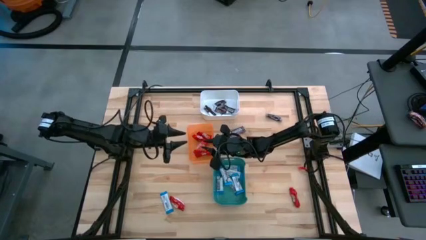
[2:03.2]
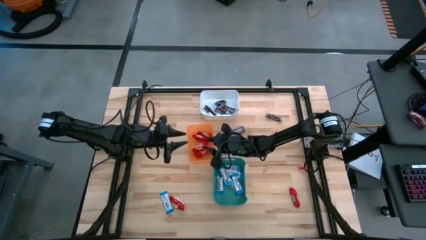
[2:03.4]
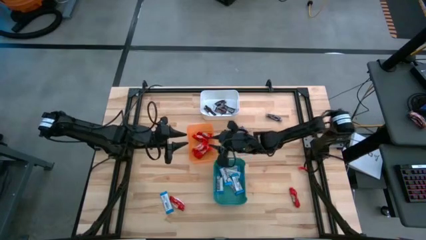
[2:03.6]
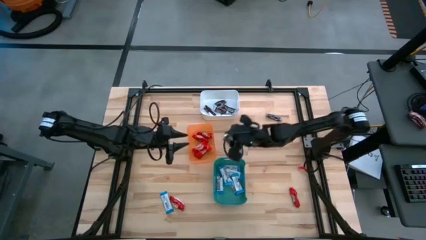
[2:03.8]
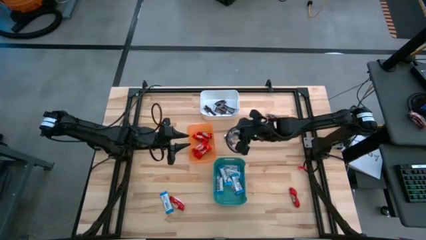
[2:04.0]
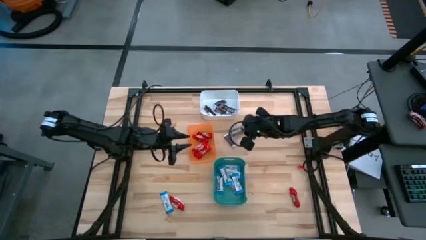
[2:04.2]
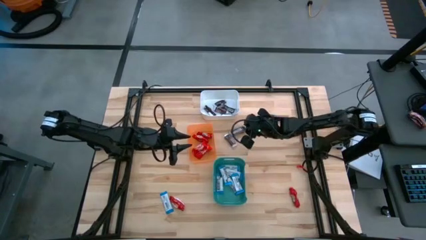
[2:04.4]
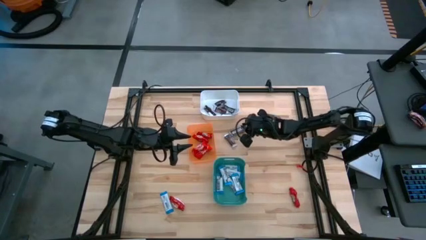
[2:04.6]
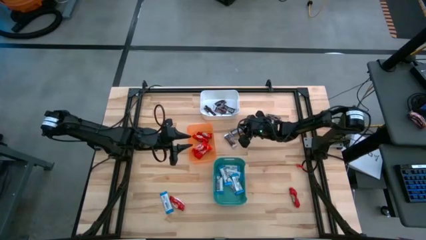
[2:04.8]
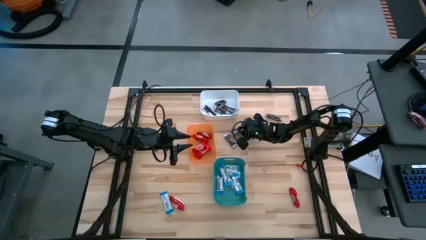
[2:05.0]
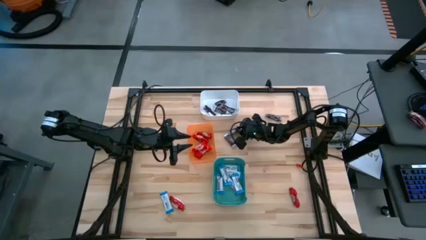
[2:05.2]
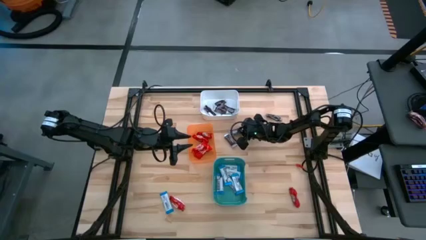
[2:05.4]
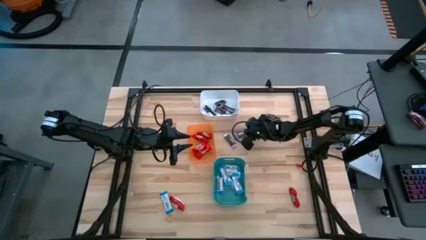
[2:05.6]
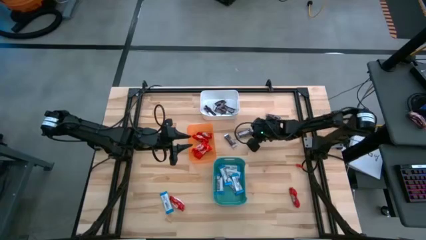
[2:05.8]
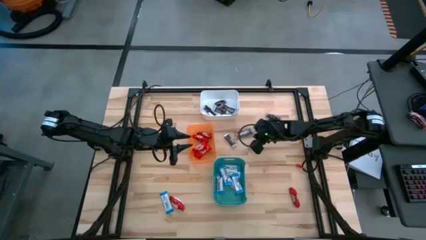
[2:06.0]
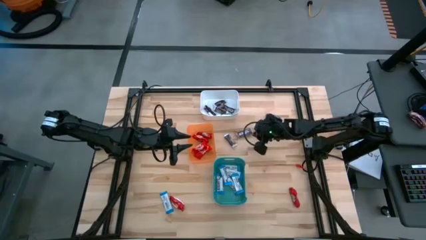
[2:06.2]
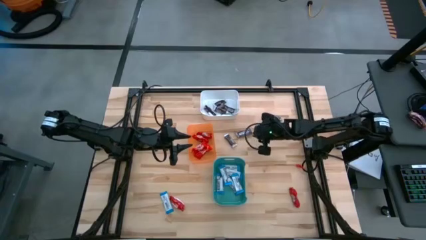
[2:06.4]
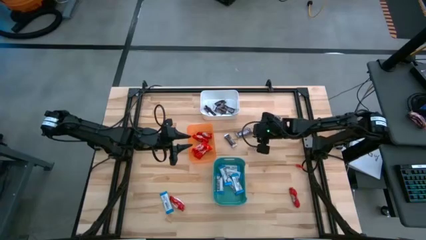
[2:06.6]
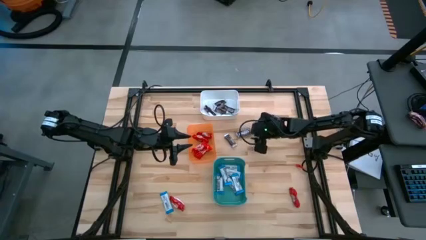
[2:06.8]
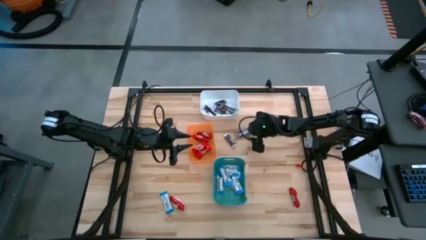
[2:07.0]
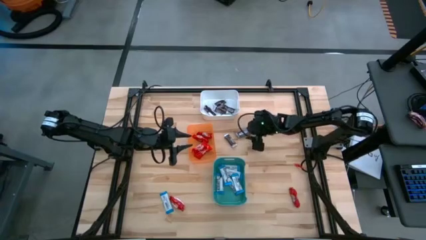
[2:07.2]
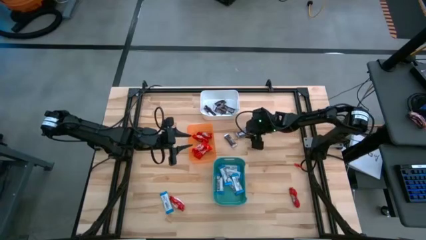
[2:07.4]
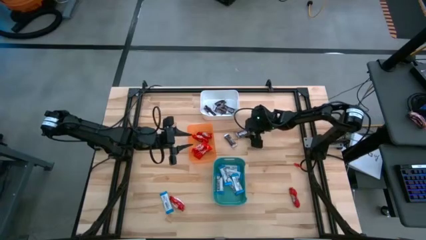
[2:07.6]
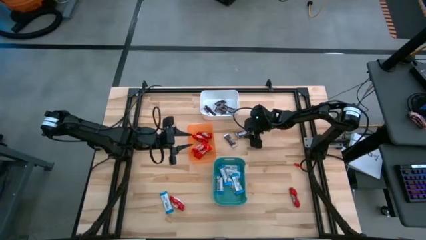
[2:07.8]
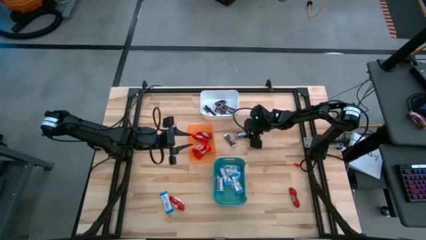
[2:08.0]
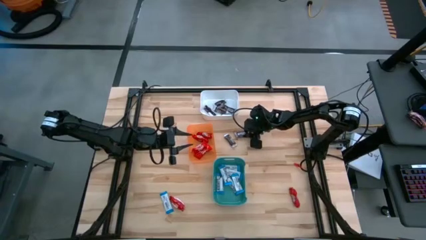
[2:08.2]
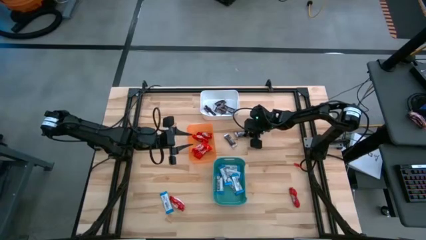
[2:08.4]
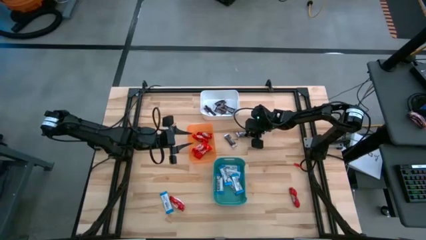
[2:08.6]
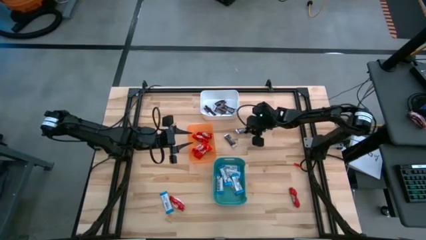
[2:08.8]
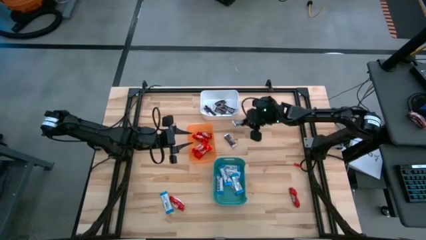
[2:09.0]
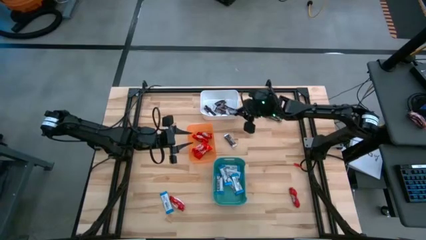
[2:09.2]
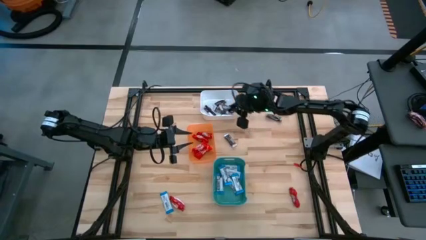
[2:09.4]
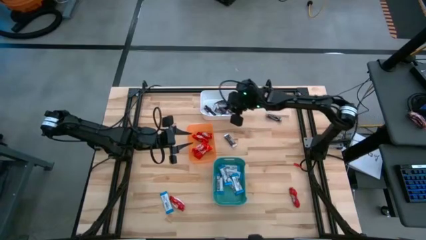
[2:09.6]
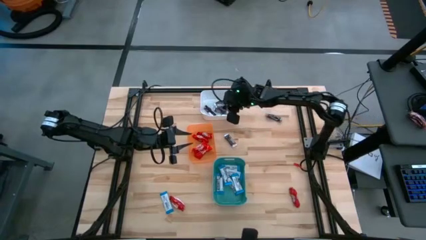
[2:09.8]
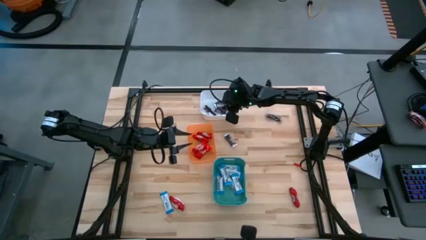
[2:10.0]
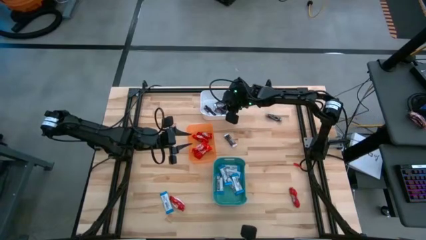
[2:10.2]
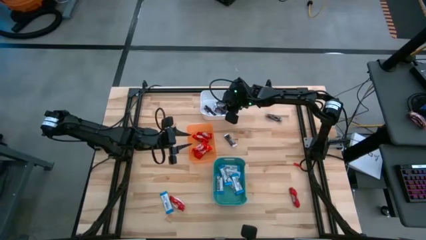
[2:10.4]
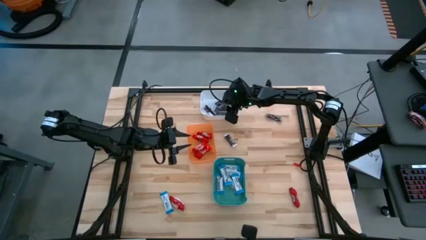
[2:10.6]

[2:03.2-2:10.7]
Task: Sort candy
Put the brown chocolate bar into the white bin

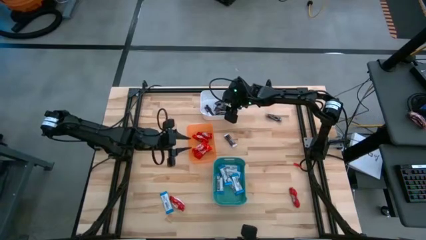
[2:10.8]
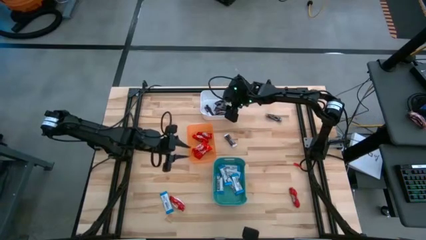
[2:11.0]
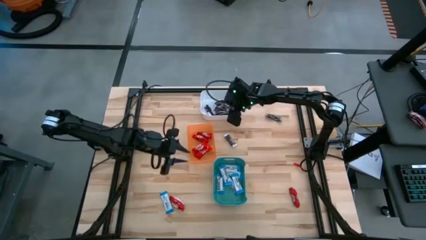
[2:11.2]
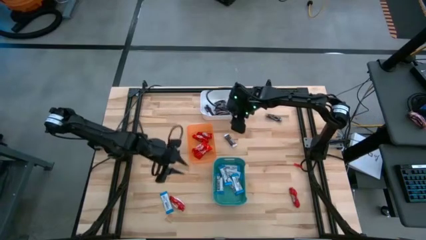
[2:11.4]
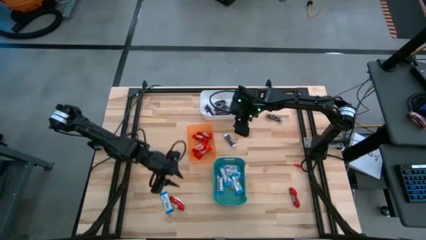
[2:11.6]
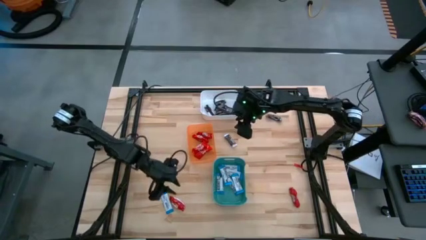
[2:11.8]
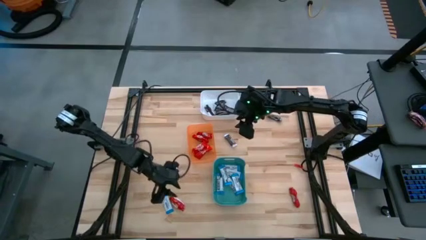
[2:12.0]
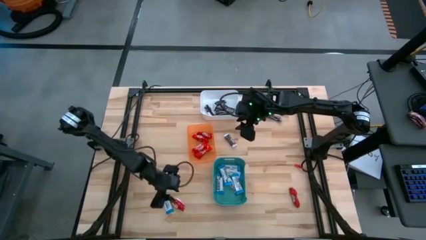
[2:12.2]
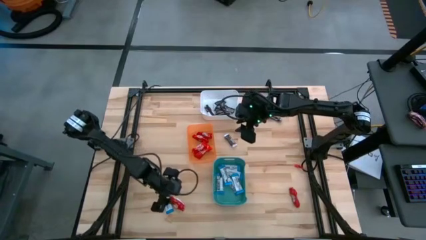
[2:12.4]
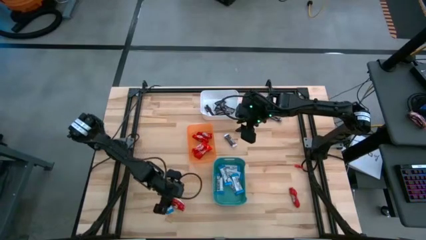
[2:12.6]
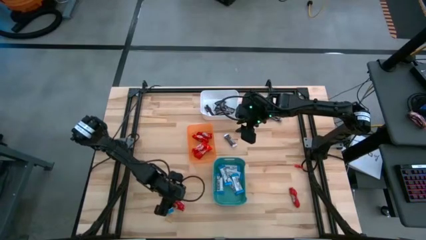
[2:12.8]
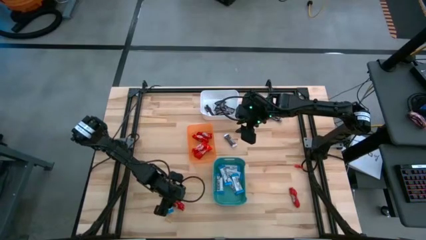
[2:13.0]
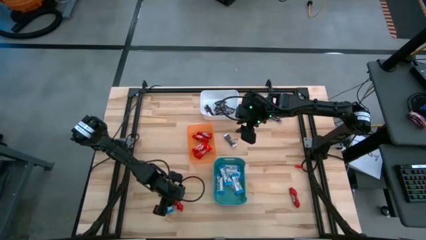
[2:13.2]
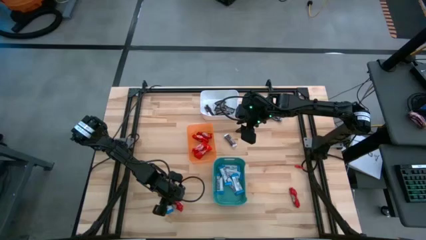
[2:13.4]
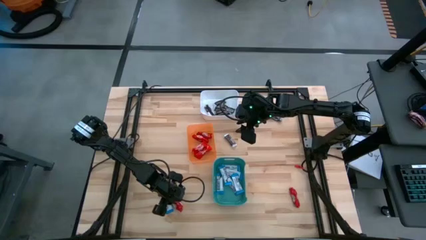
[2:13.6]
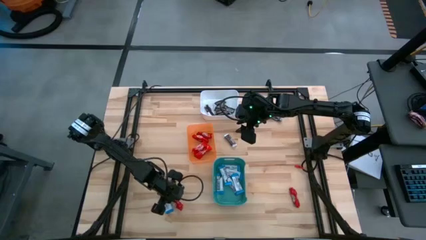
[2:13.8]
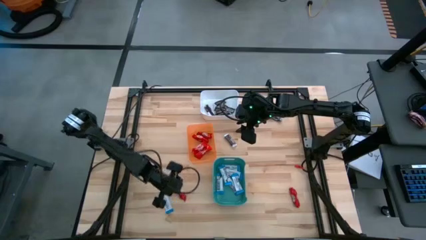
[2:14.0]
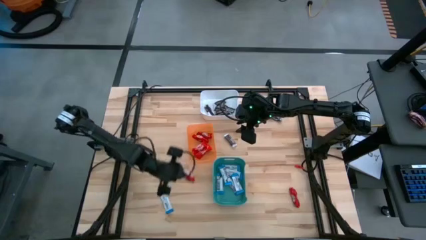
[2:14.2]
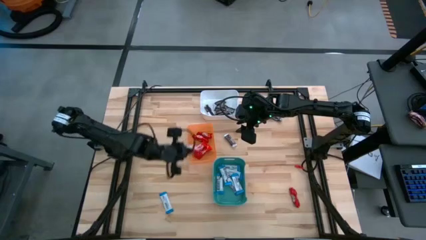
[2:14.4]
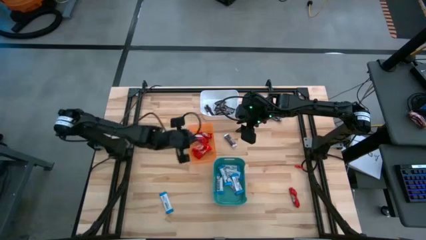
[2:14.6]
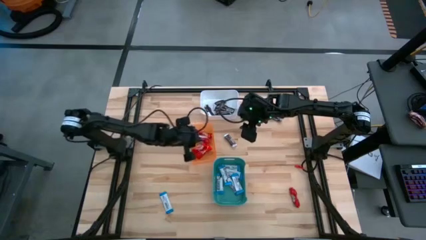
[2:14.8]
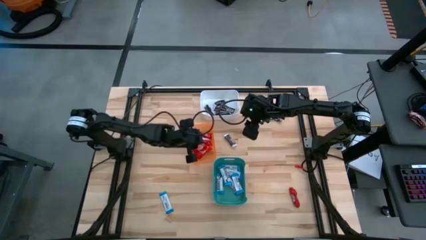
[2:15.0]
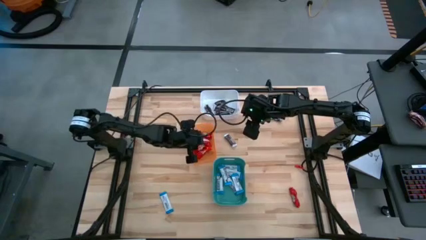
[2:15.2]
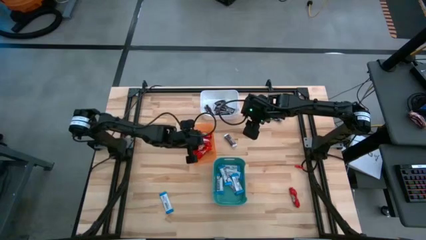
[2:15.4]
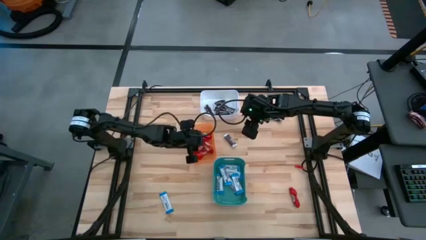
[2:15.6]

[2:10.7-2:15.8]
Put the red chocolate bar into the orange bin

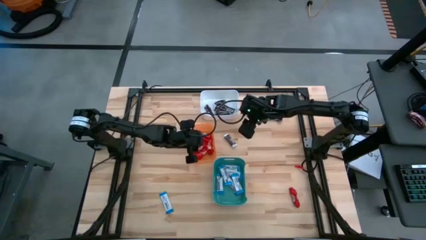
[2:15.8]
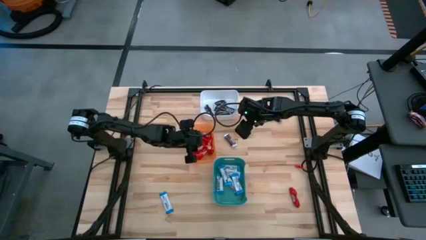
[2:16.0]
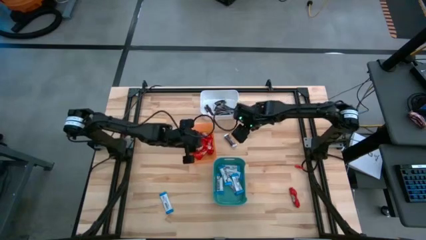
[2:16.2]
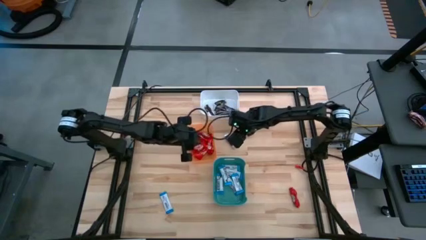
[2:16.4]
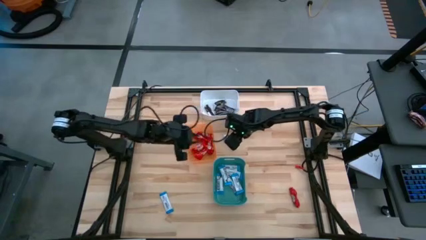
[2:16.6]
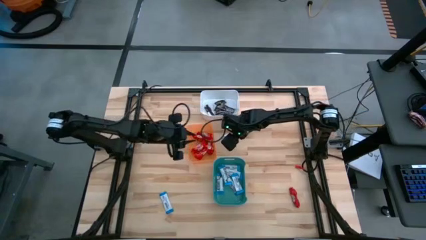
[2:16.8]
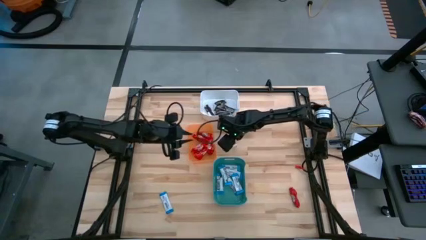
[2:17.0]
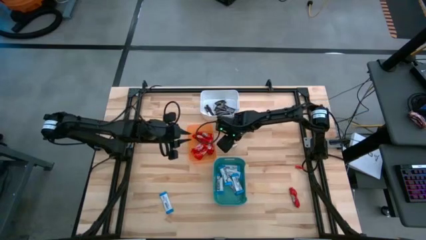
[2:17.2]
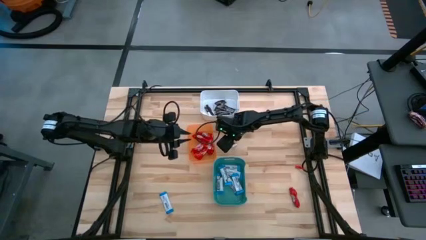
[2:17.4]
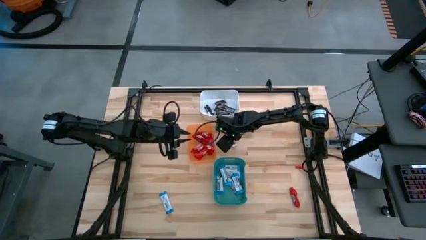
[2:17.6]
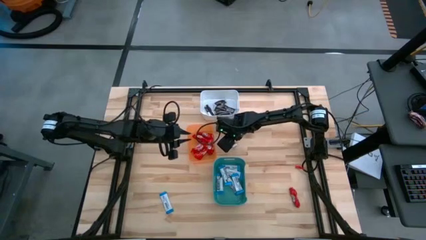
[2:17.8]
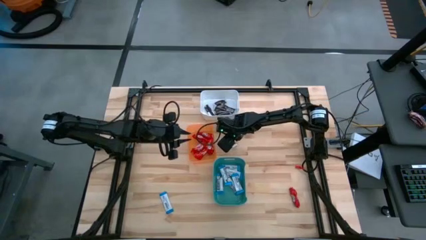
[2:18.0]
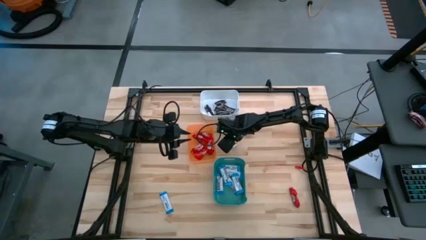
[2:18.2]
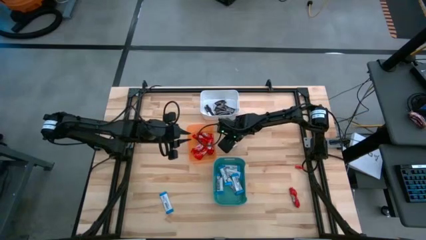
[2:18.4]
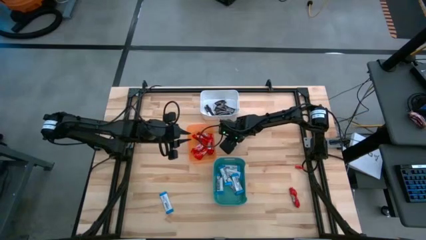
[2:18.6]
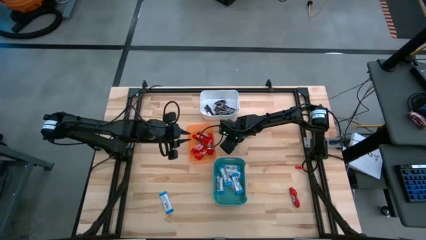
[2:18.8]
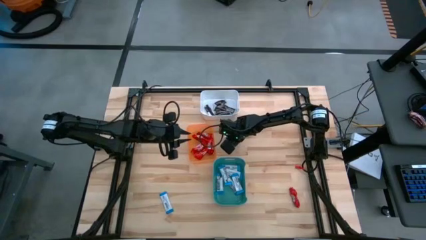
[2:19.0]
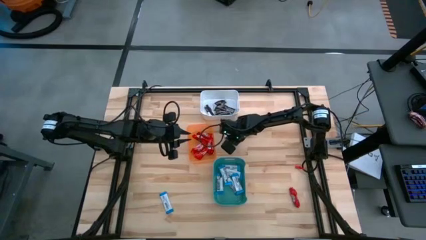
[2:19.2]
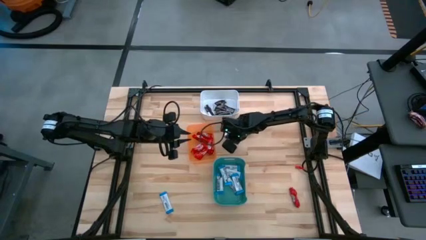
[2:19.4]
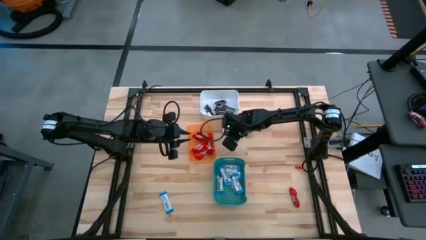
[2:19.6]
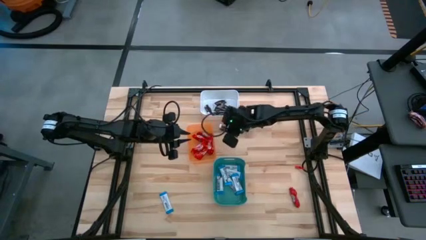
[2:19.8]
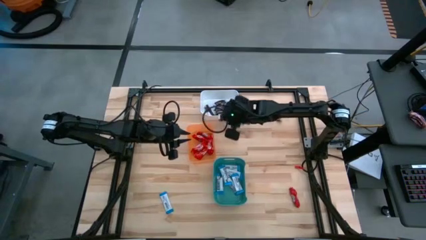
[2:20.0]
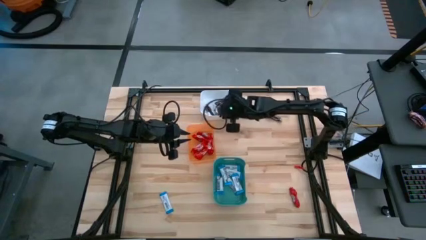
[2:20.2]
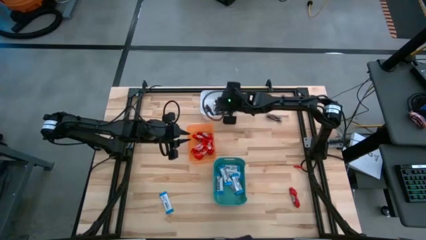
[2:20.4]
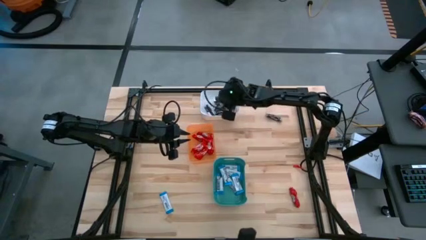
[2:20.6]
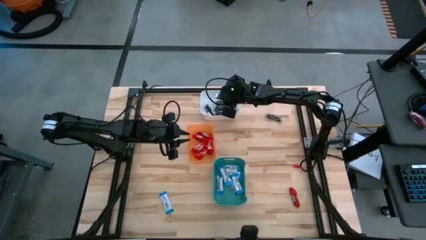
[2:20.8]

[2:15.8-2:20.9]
Put the brown chocolate bar into the white bin
